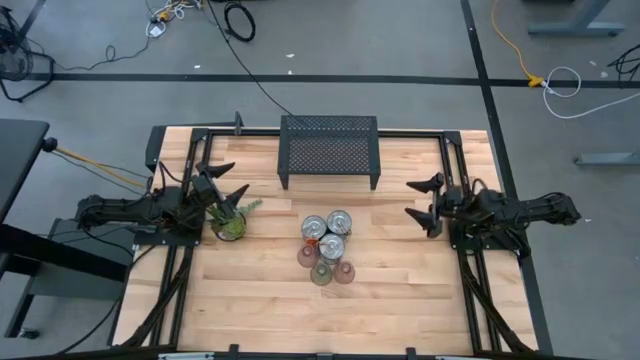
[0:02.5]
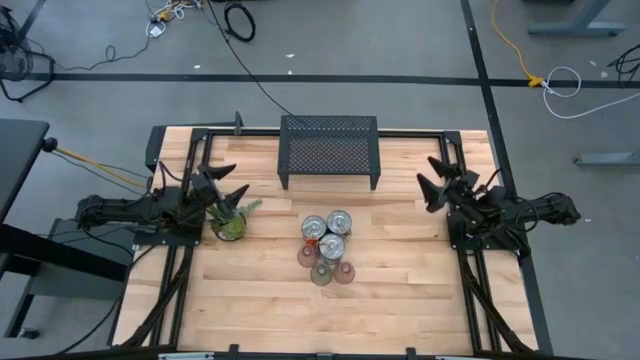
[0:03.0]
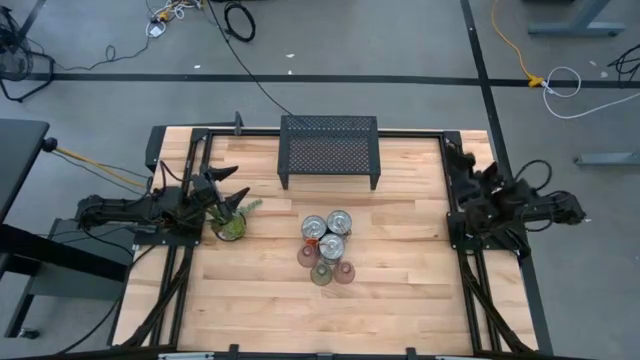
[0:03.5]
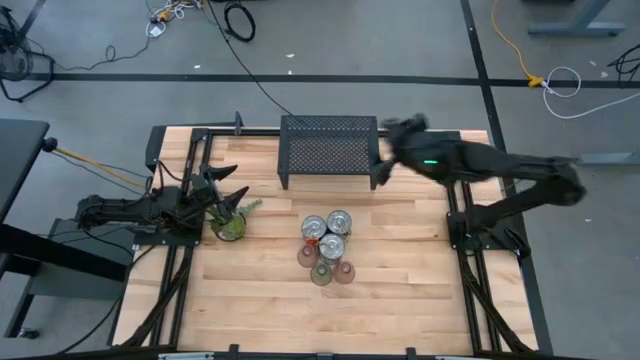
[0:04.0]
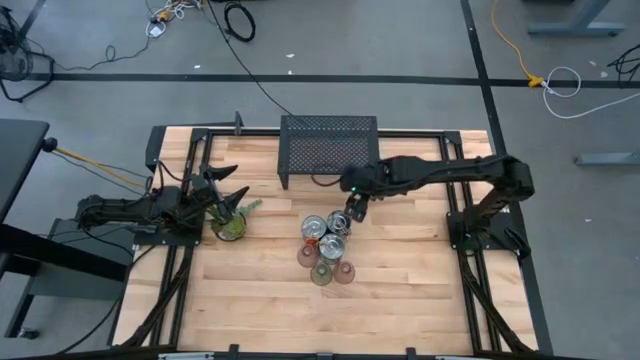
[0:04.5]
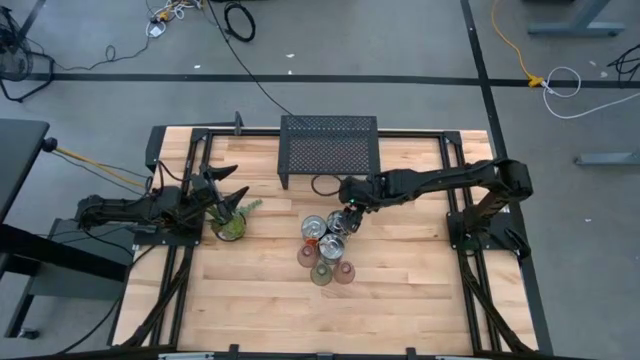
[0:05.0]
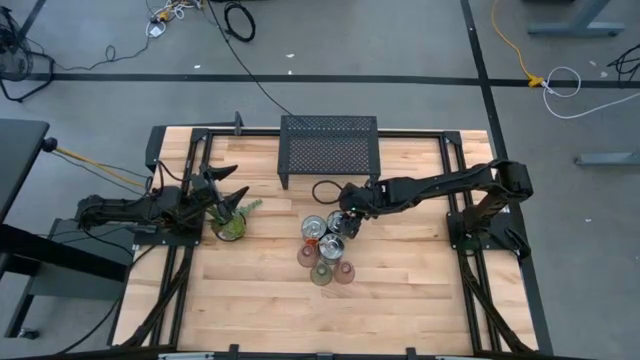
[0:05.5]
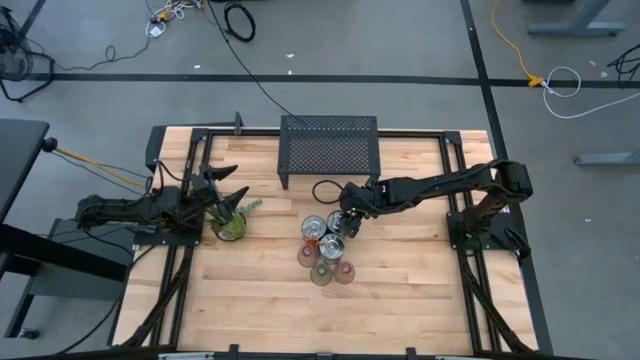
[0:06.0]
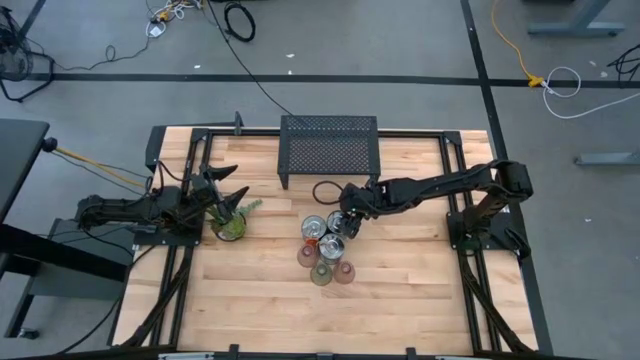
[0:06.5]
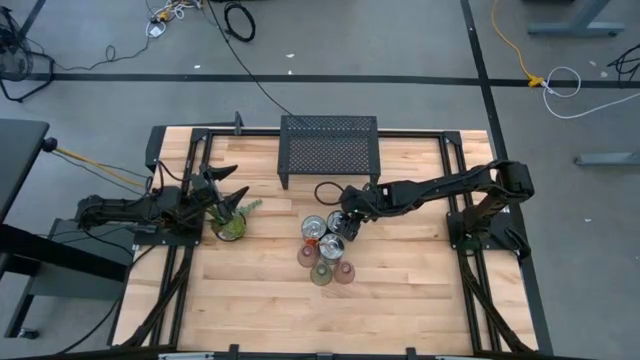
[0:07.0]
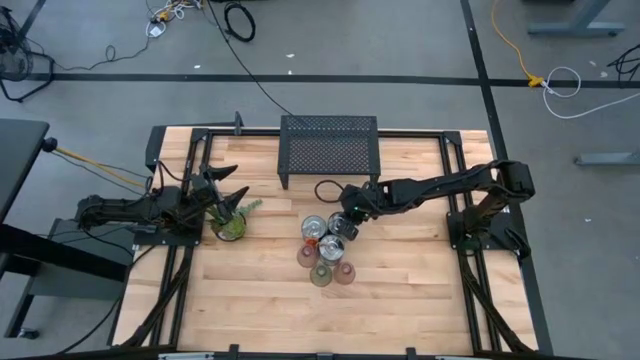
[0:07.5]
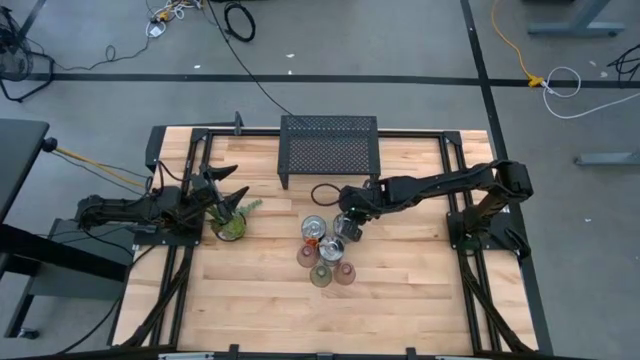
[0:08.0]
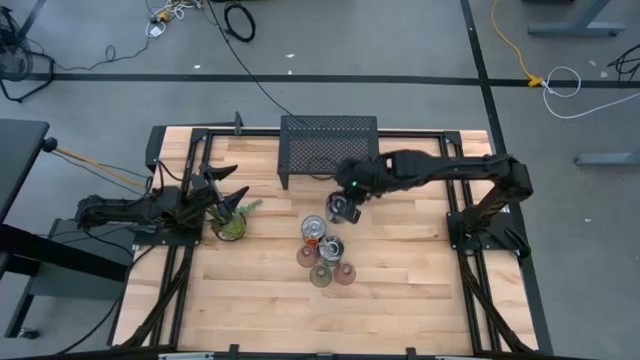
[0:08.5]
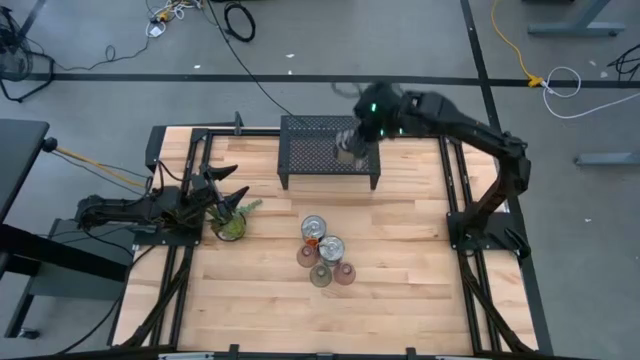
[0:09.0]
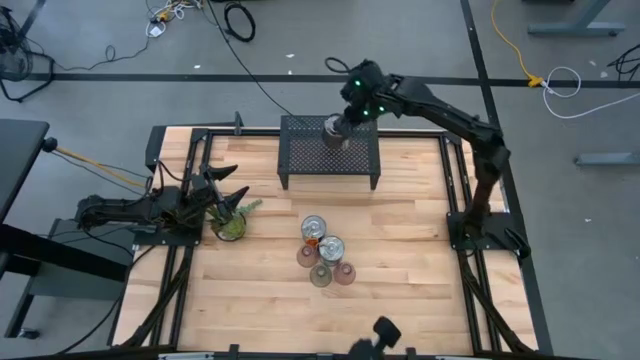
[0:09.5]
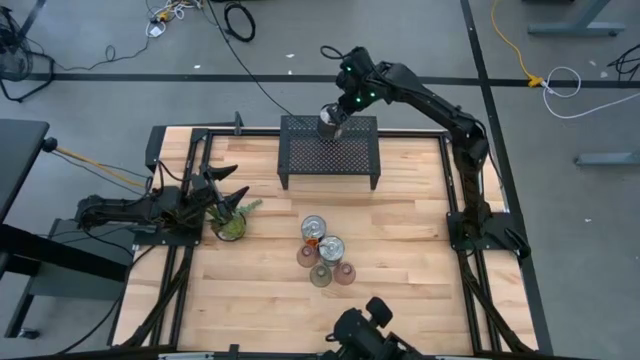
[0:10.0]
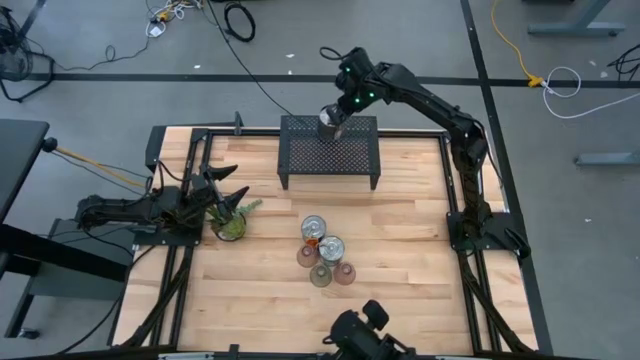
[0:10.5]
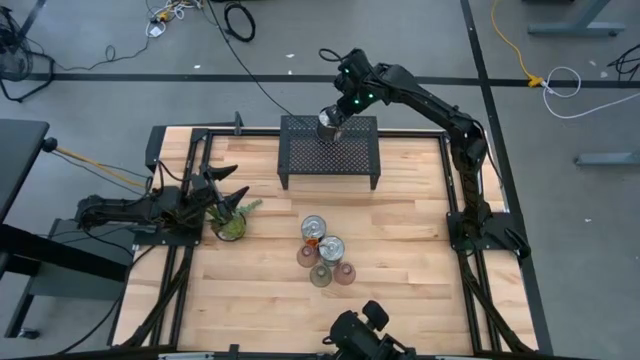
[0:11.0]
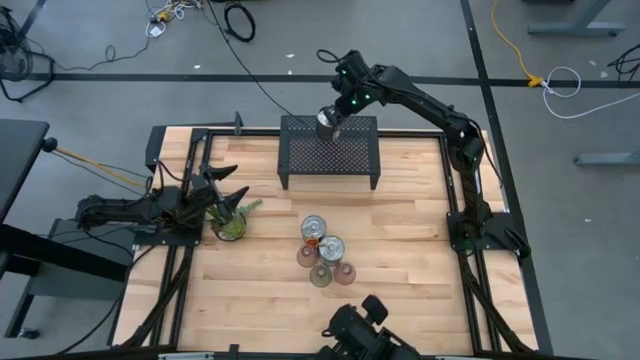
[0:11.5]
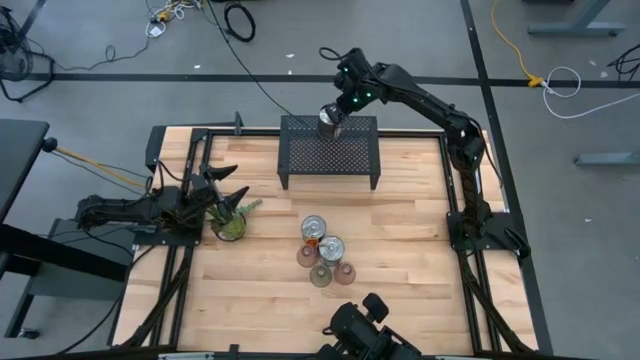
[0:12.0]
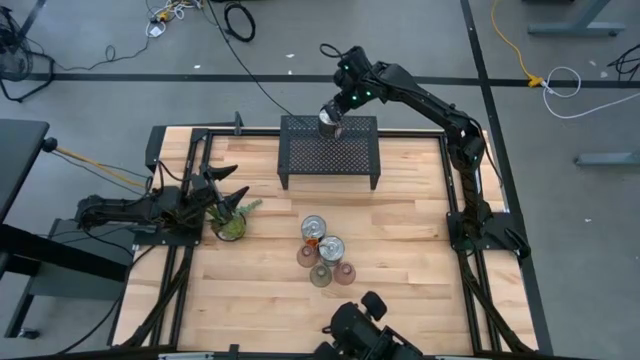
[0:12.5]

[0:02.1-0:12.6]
Task: Pick & Place candle stick holders
Put the top silver scented candle on the shelf

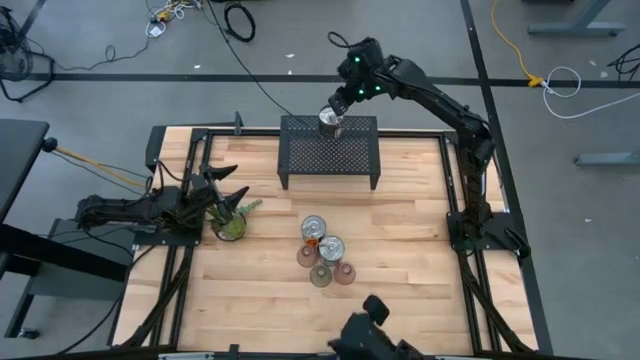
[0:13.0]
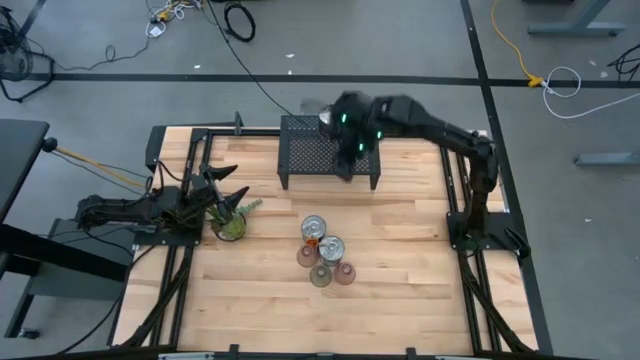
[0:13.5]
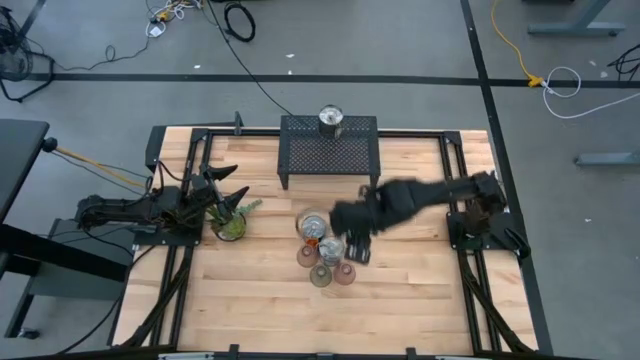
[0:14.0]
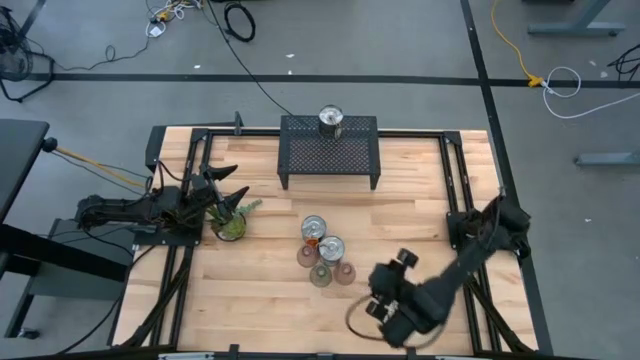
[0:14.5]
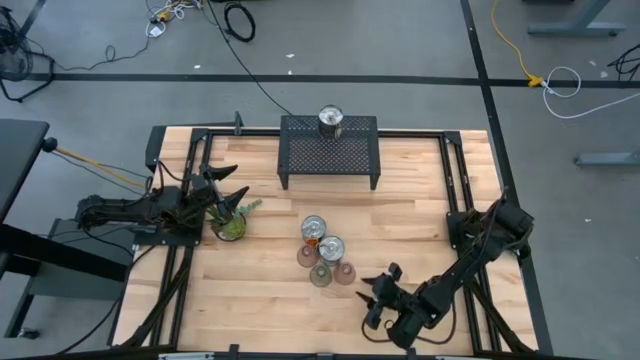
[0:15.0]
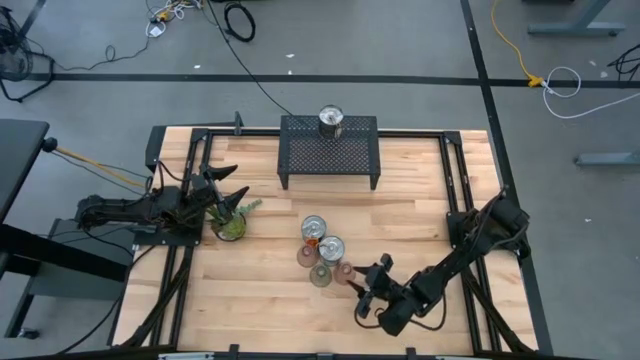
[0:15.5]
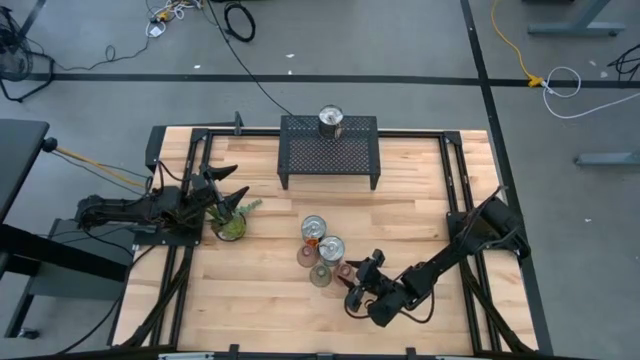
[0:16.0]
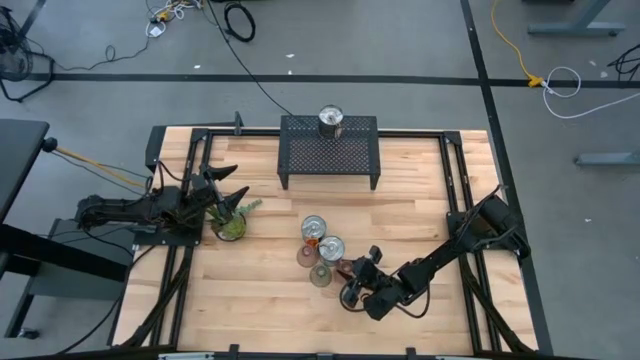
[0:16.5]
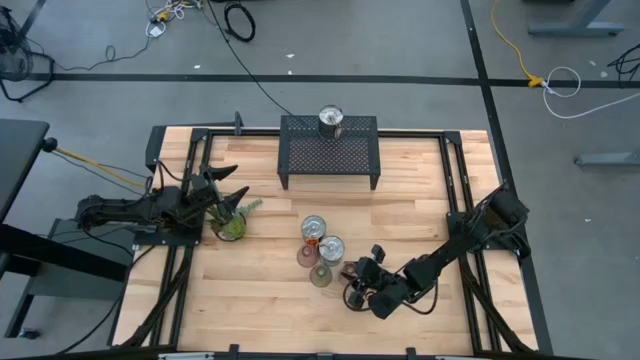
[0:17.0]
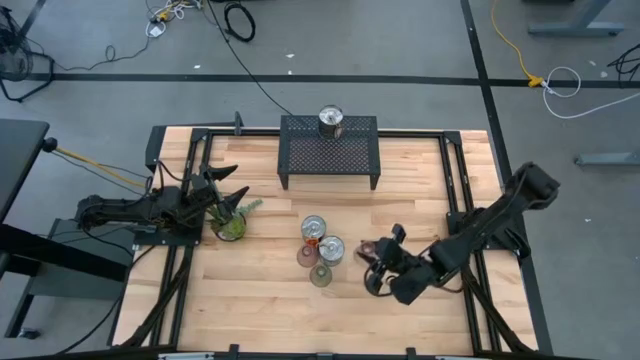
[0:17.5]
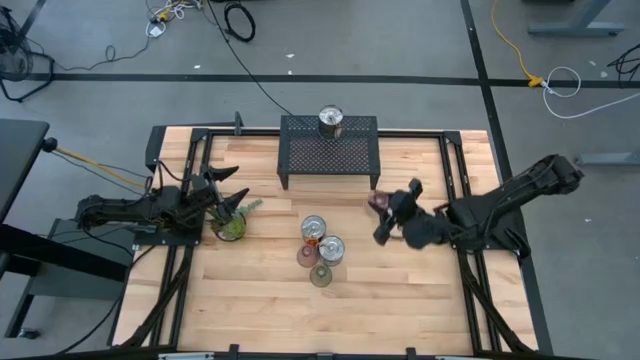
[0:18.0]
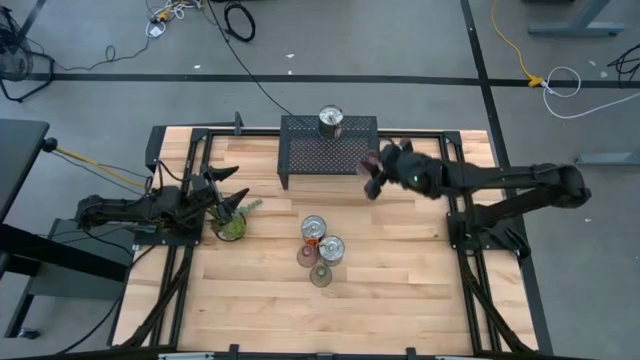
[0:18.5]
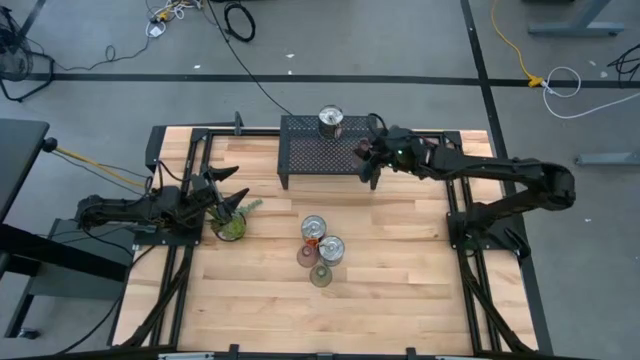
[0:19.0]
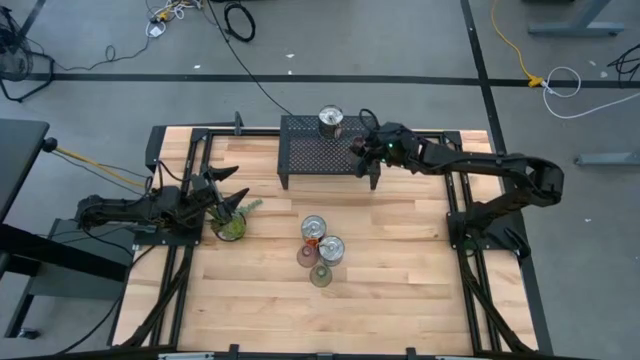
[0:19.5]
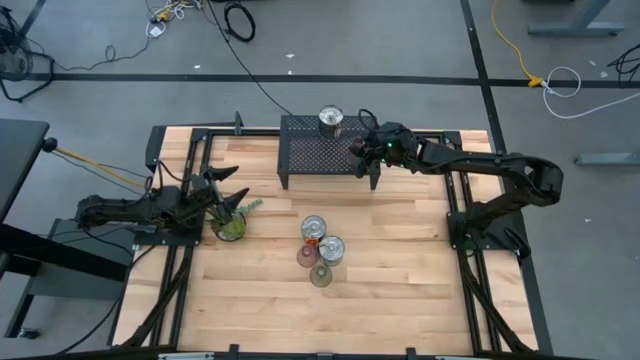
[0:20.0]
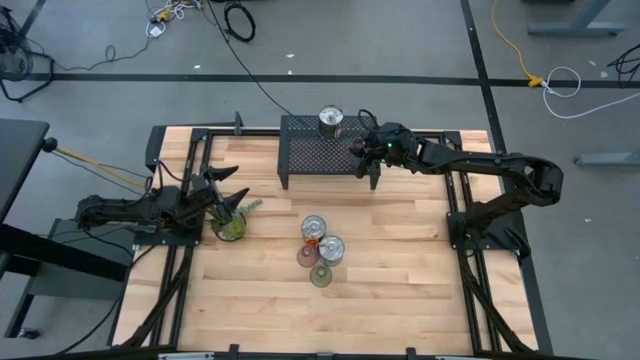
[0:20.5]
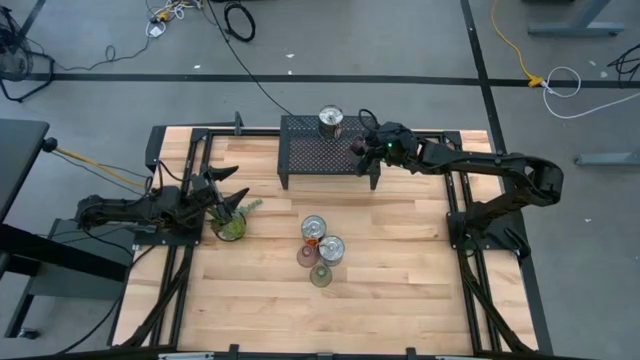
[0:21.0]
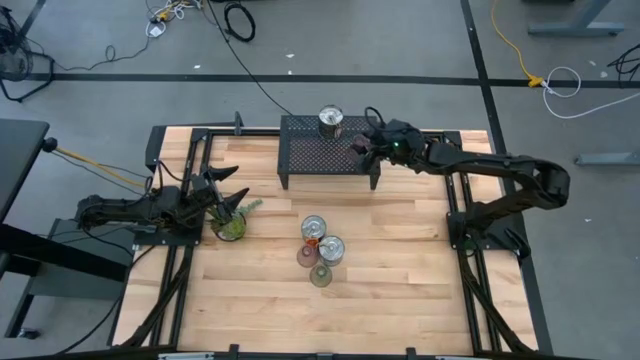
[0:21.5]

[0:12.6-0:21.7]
Put the right pink glass candle holder on the shelf

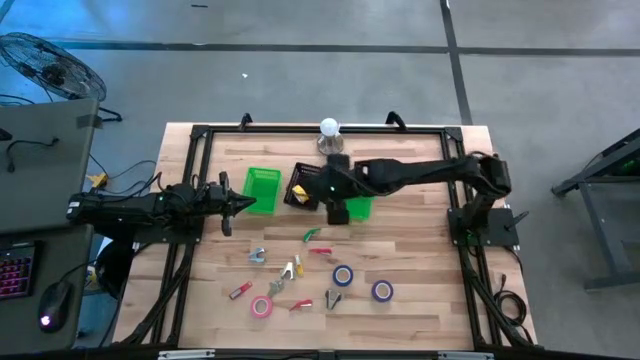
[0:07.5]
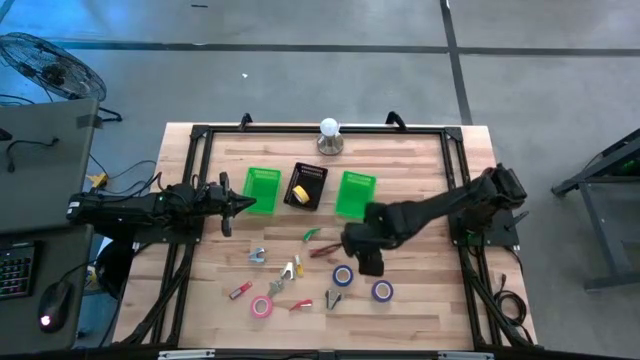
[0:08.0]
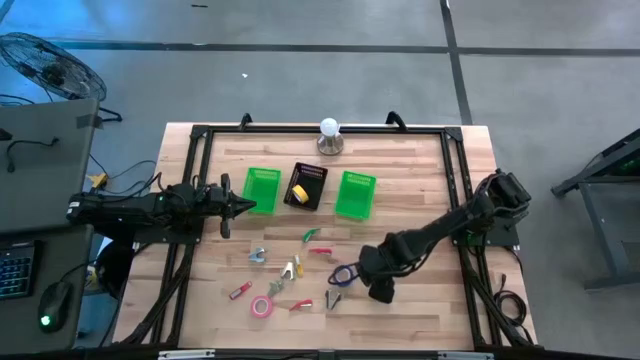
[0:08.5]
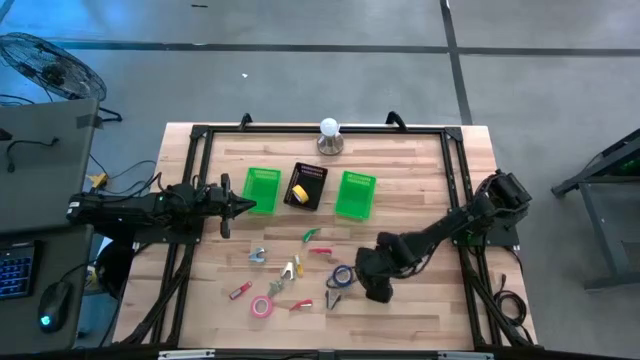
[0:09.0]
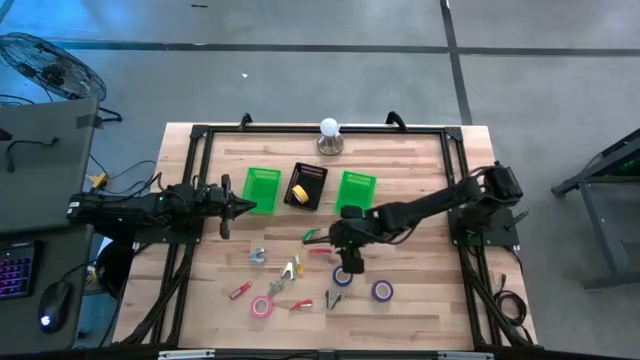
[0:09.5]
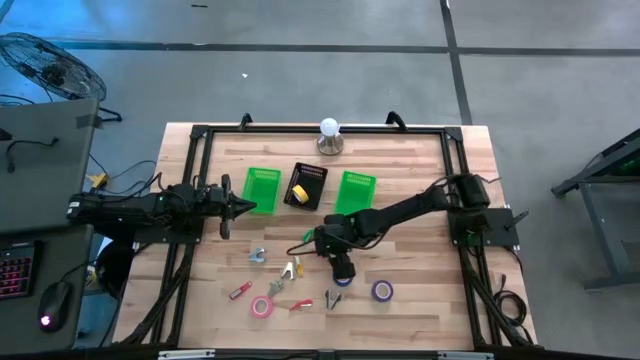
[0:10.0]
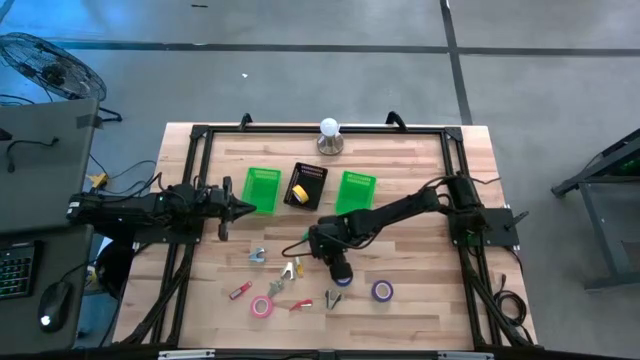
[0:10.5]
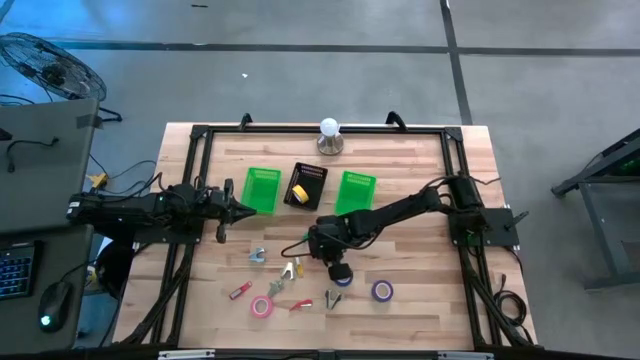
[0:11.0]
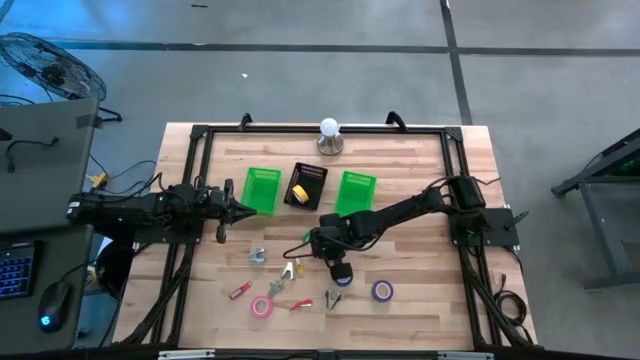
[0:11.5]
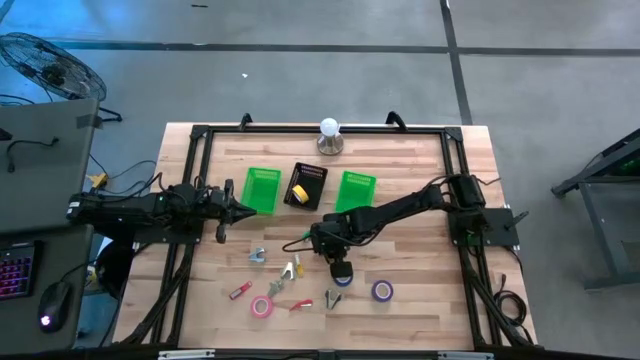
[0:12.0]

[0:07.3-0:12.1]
Task: Pick and place Stapler, Stapler remover, tape
Put the top red stapler into the right green bin
